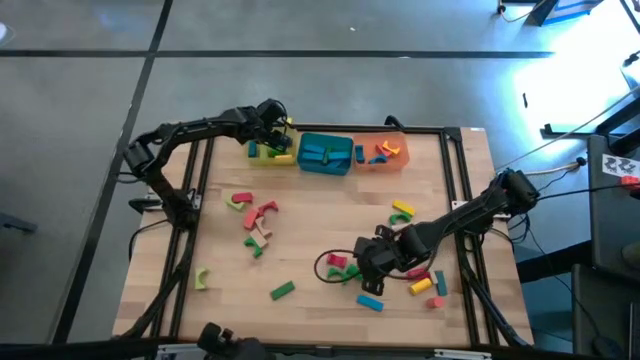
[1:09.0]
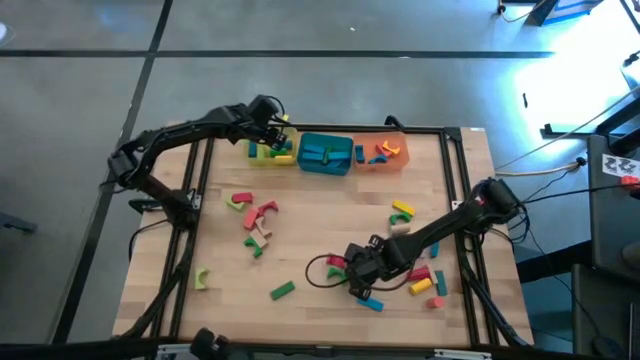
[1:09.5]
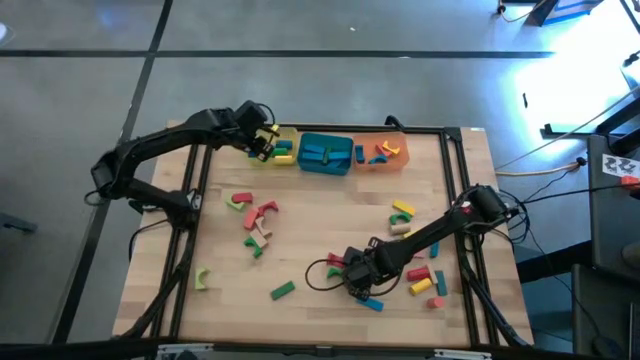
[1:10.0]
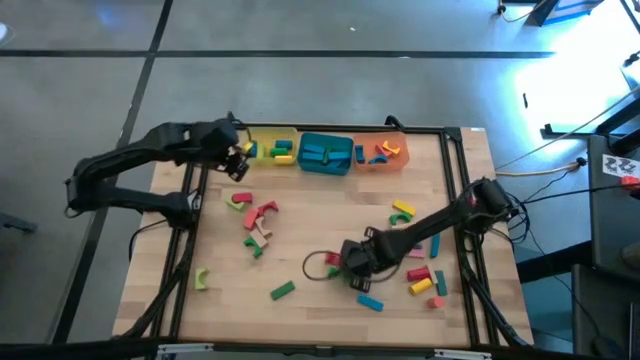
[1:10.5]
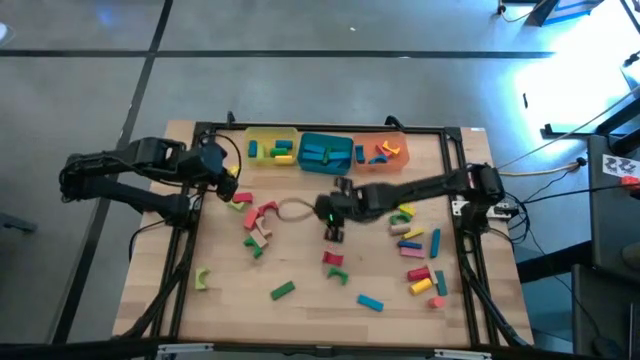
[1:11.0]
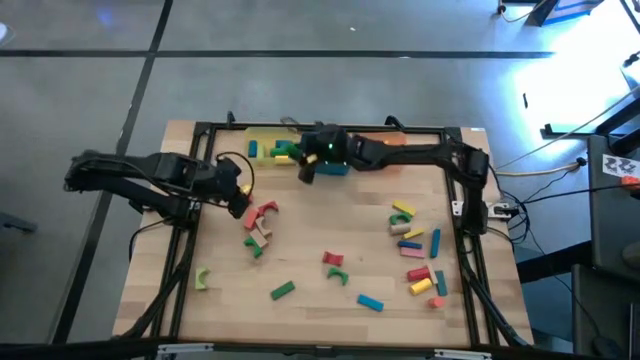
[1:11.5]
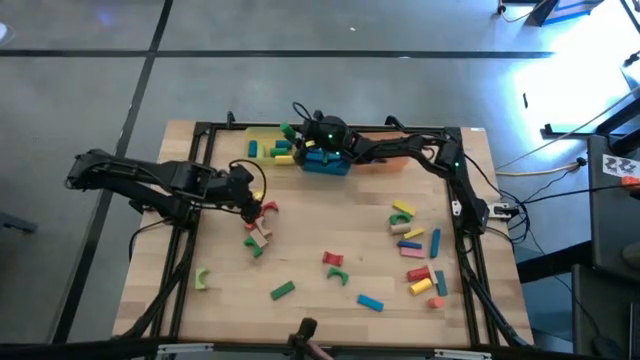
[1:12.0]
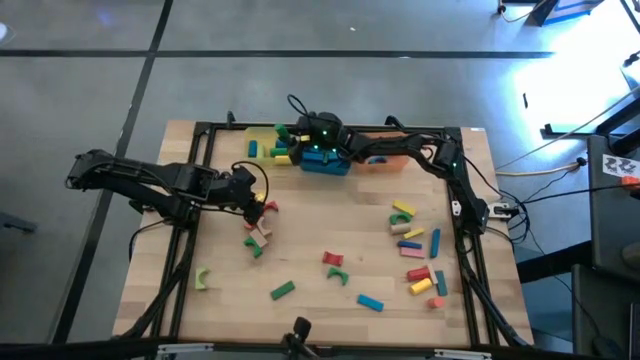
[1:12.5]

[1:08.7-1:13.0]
Task: Sort blocks by size
Put the green cylindrical block into the yellow bin

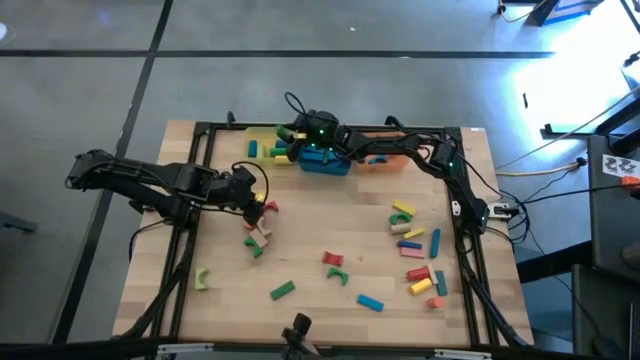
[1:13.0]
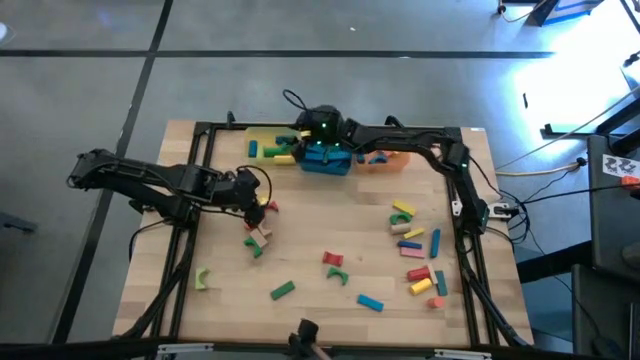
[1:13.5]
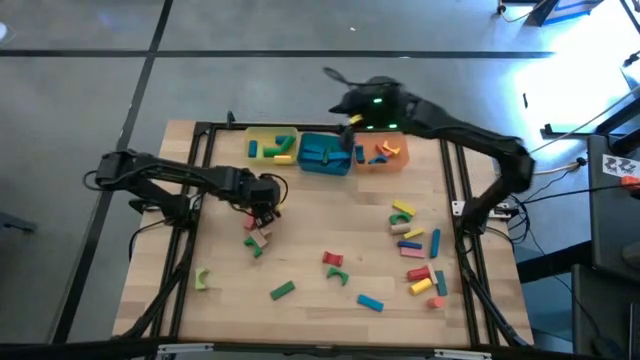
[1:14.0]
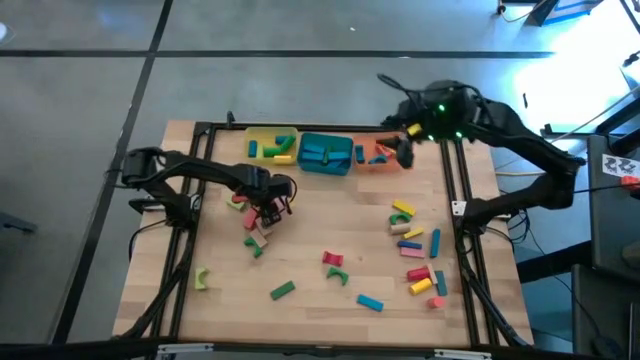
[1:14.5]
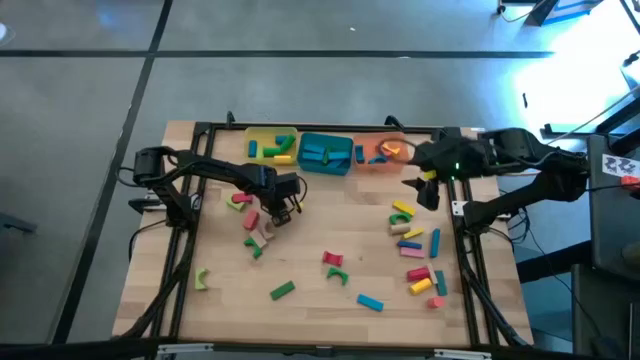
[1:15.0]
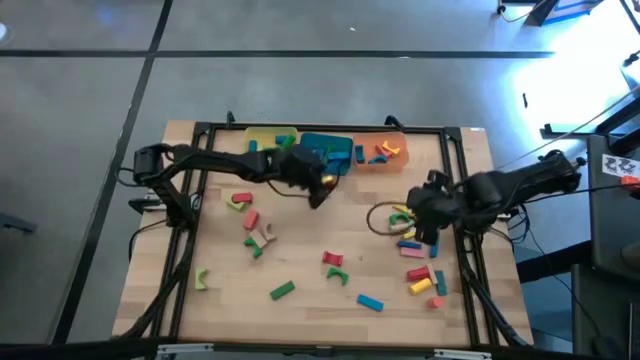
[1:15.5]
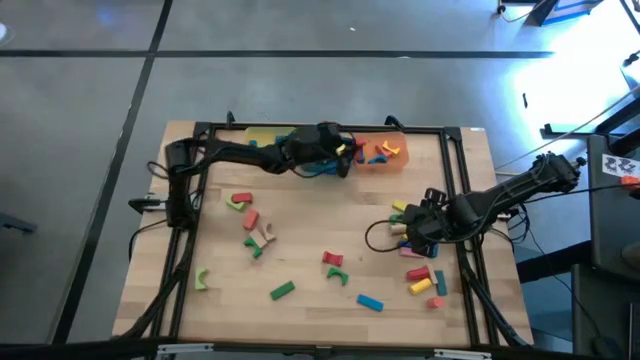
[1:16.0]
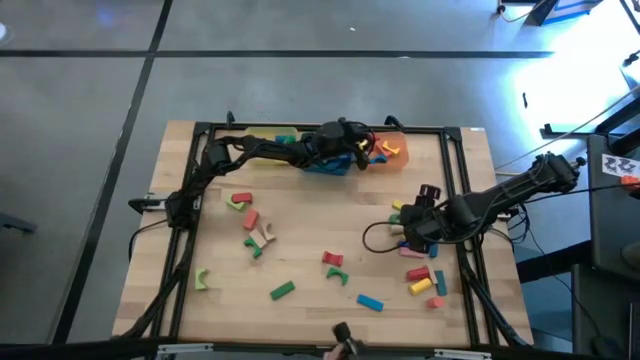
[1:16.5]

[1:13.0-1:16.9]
Put the red arch block into the orange bin

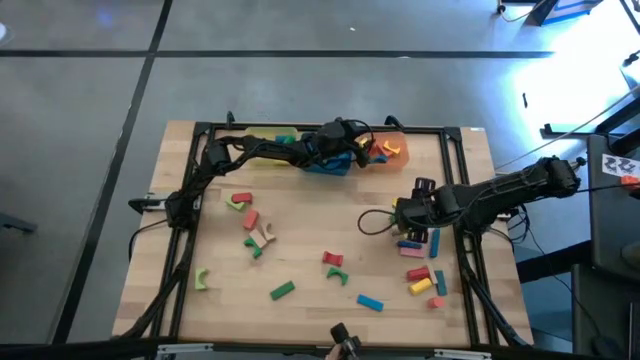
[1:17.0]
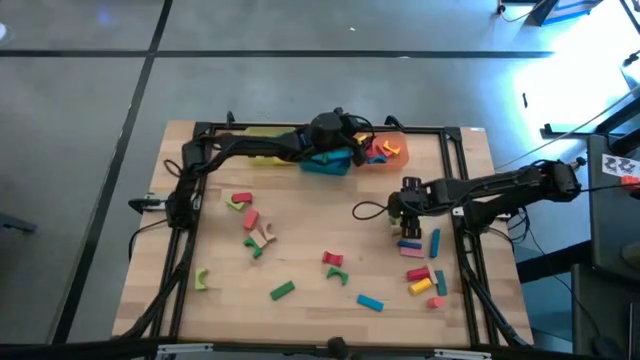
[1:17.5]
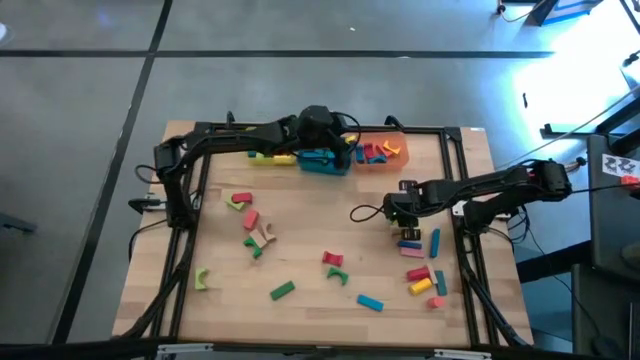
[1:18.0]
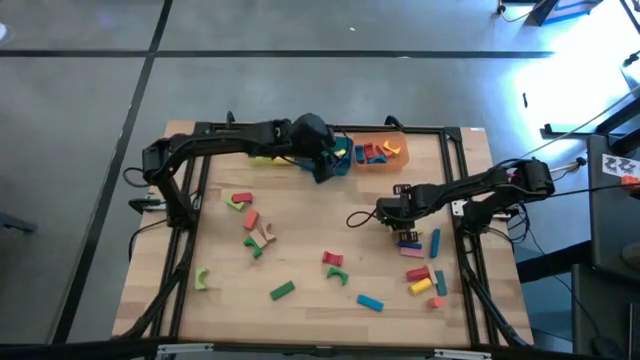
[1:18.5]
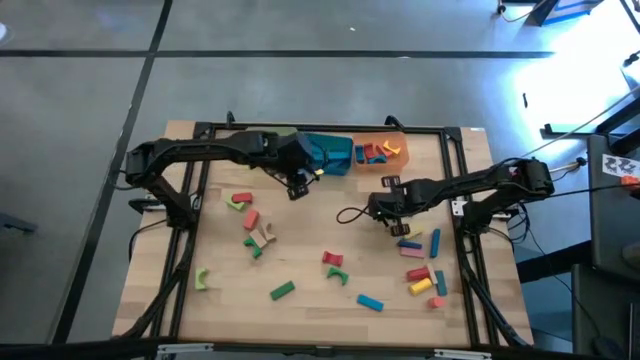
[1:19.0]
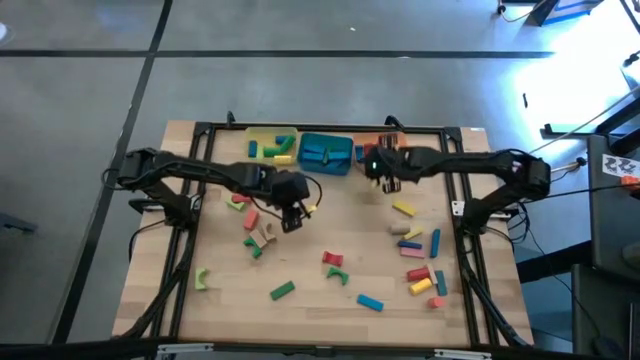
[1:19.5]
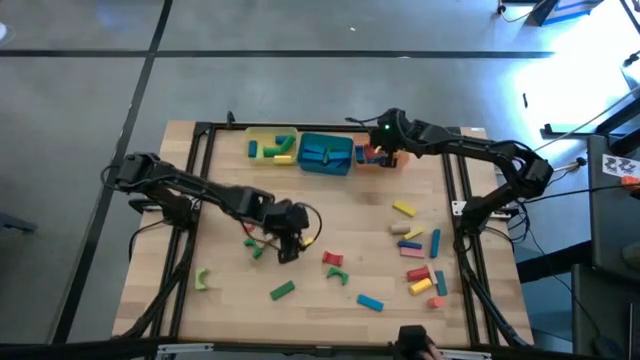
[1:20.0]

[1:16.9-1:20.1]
Put the green arch into the orange bin

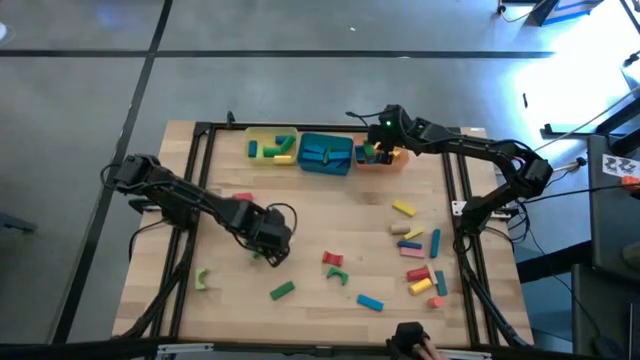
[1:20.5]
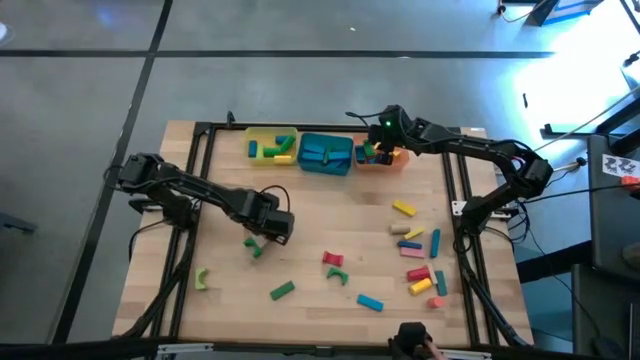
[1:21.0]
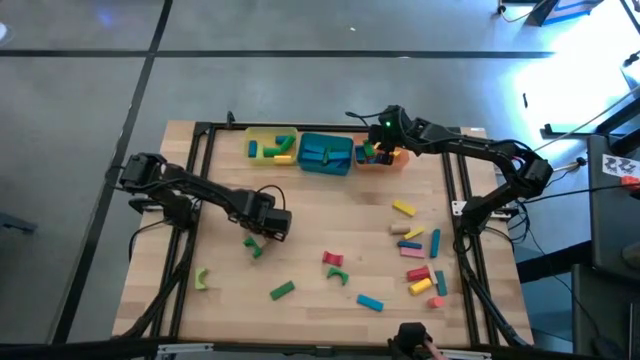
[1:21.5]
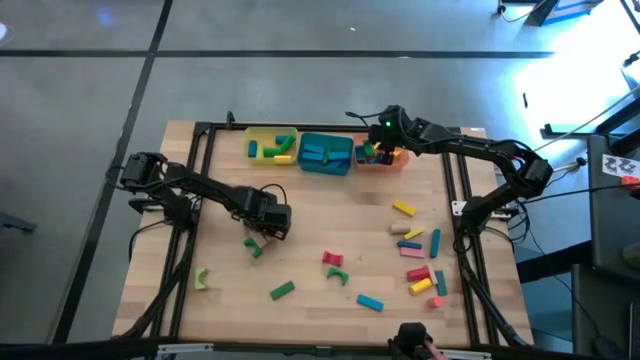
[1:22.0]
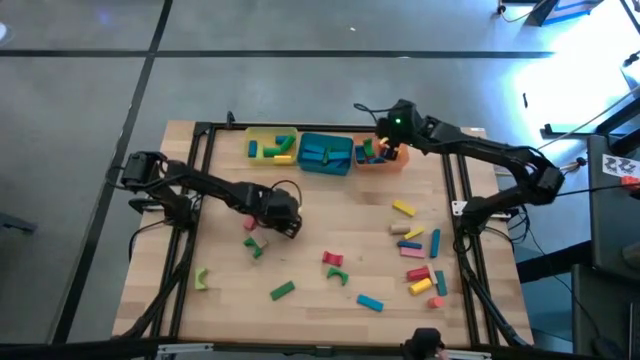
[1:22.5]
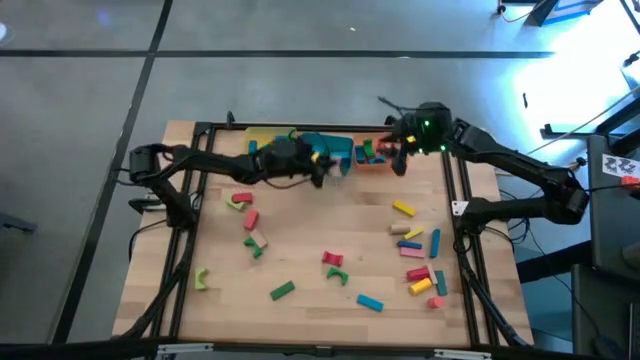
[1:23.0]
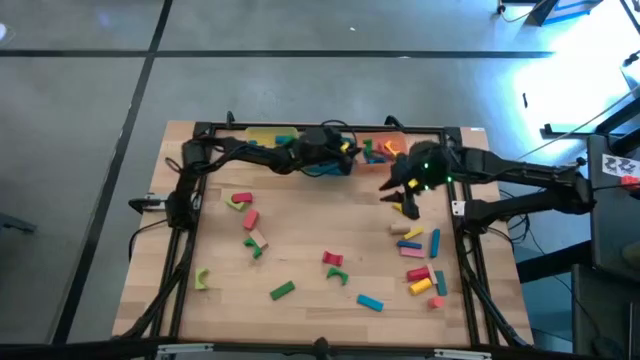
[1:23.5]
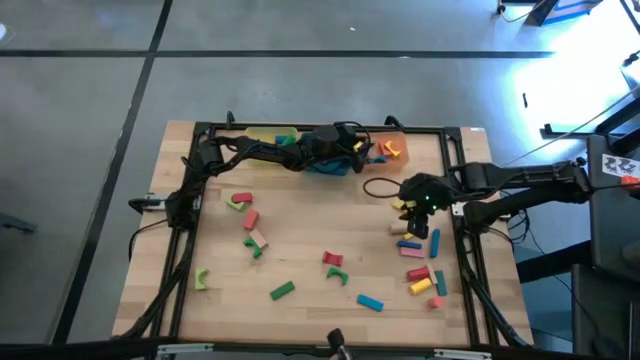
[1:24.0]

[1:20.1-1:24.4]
Put the brown arch block into the orange bin

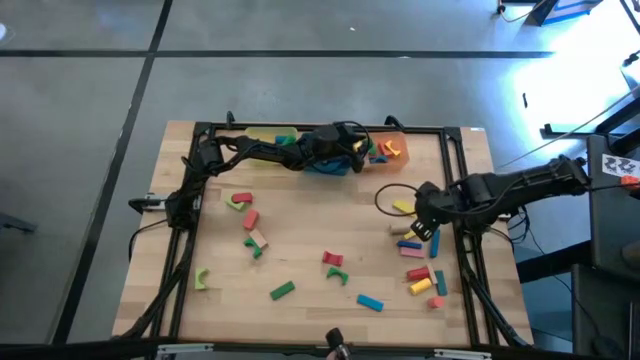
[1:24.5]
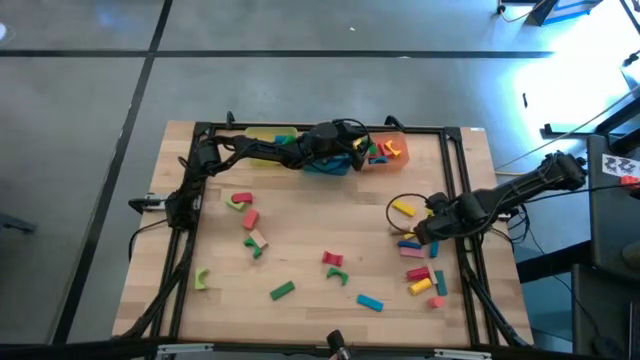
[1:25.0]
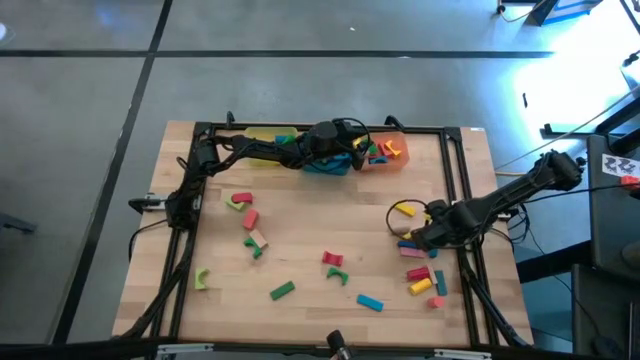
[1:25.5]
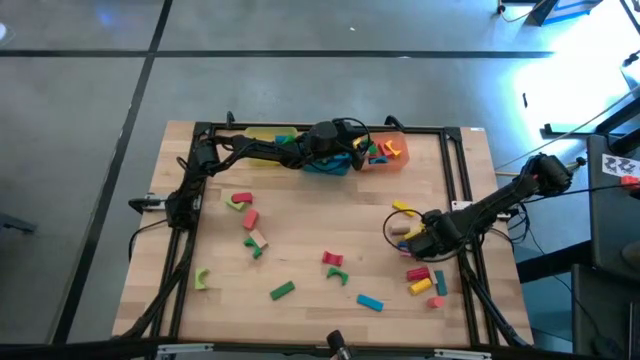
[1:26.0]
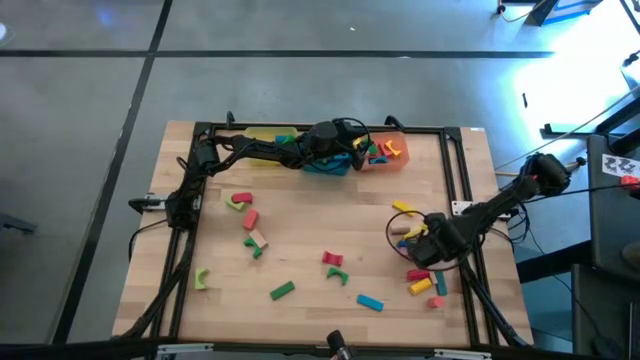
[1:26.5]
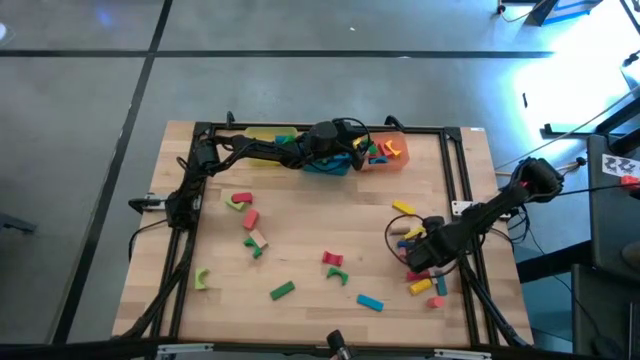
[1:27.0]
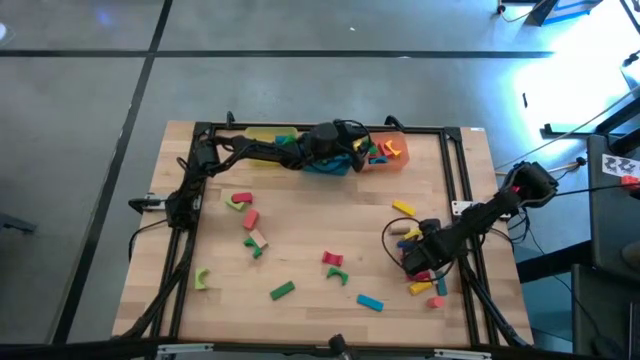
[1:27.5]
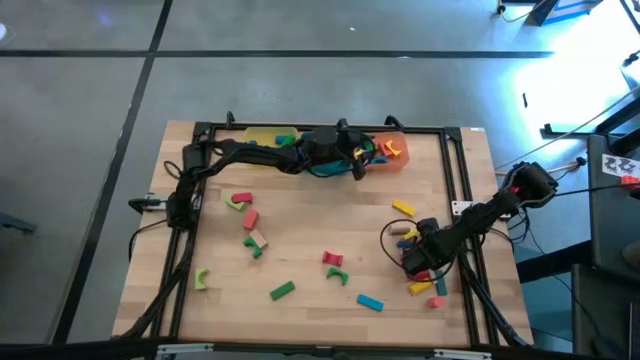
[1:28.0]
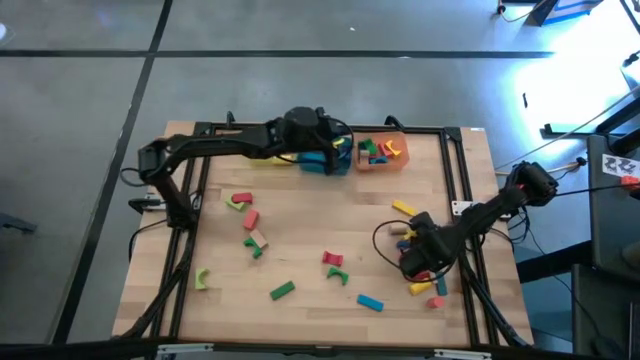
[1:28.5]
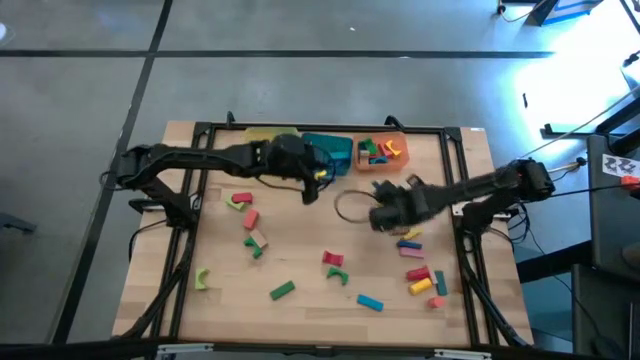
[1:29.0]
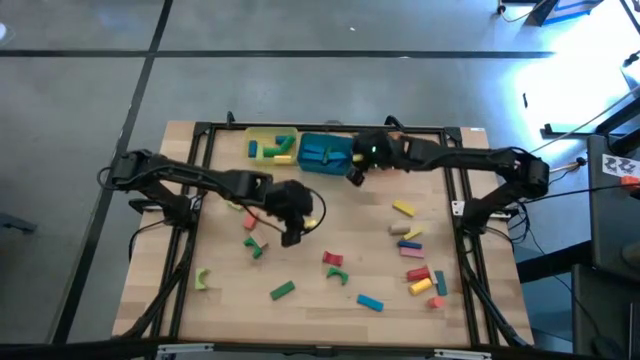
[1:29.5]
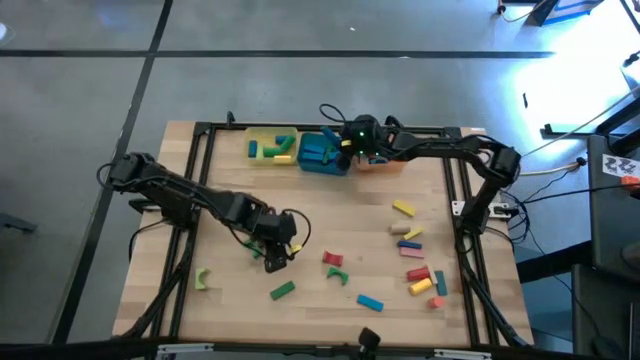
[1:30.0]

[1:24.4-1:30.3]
Put the blue rectangle block into the blue bin
